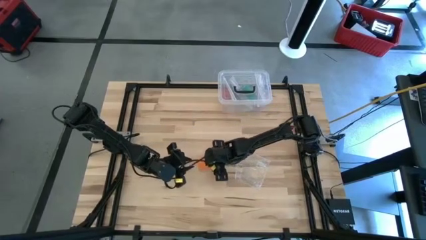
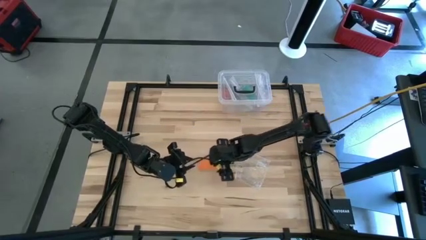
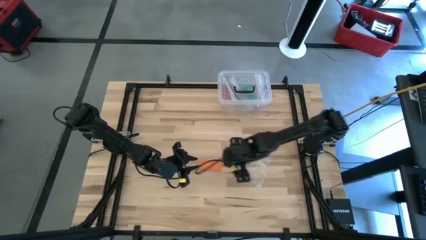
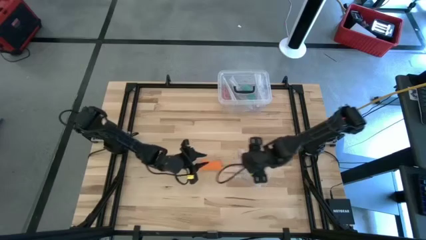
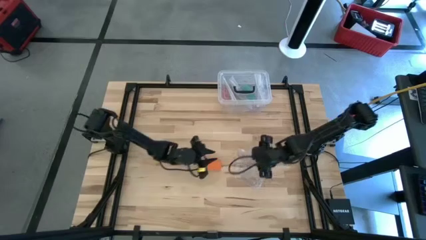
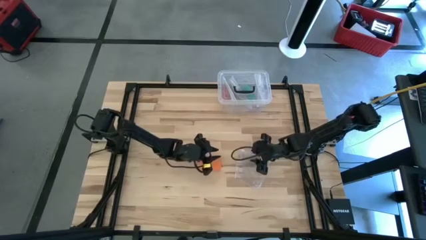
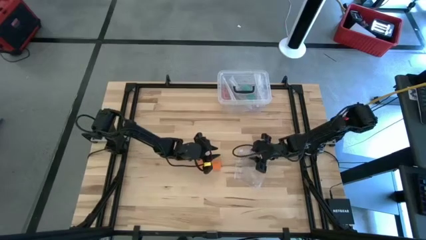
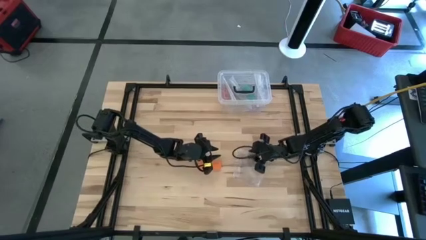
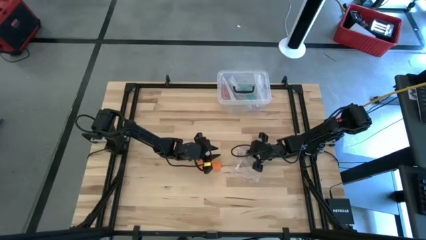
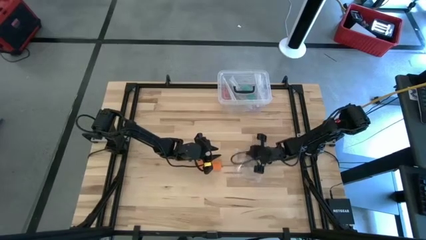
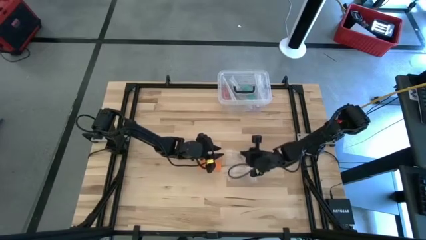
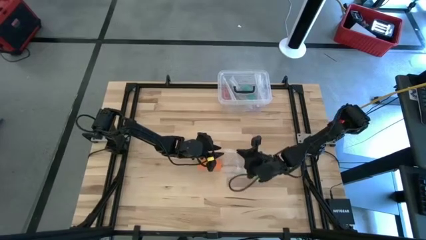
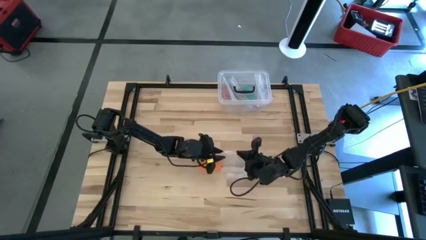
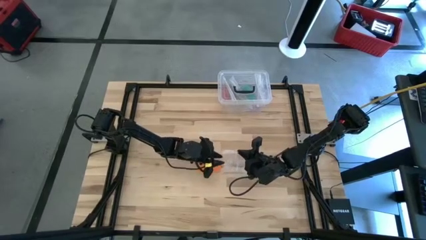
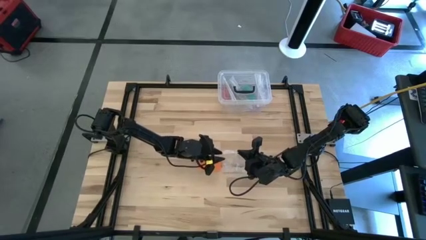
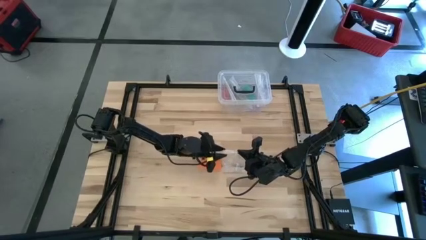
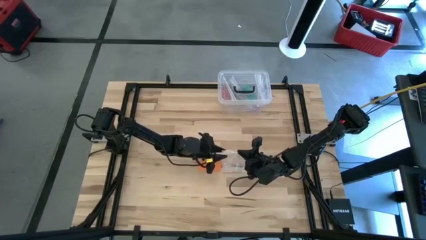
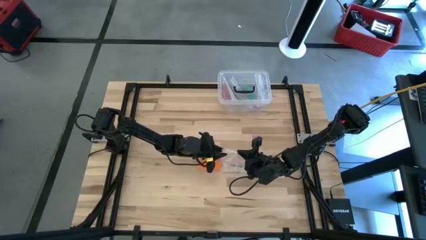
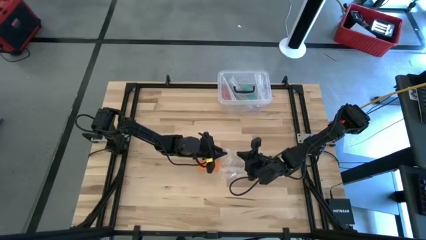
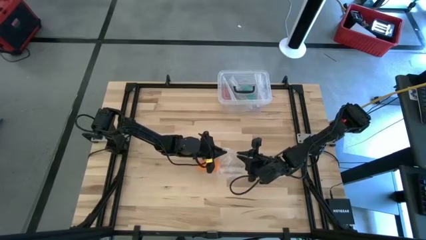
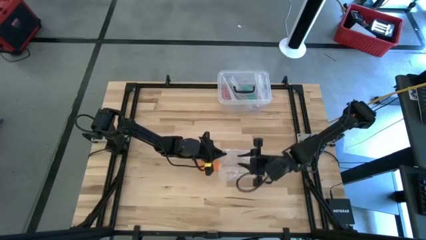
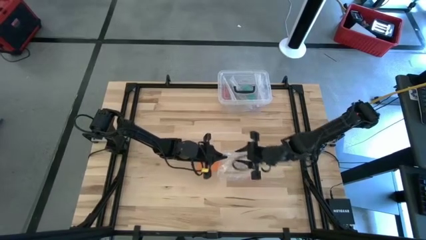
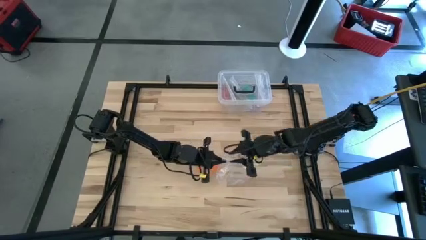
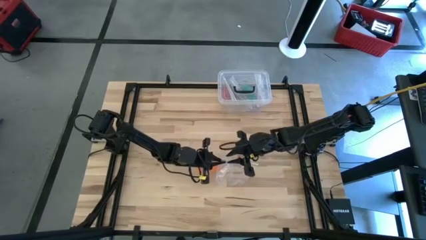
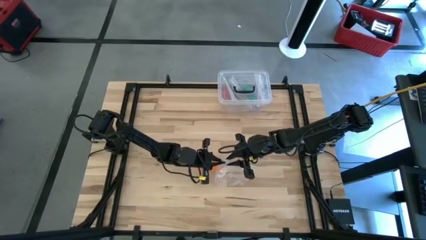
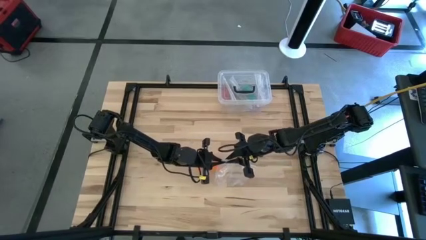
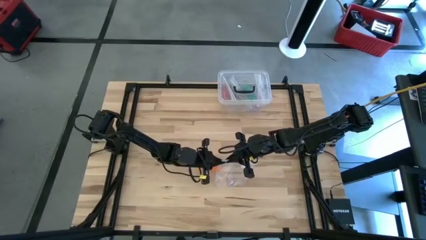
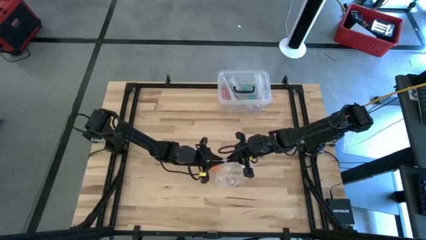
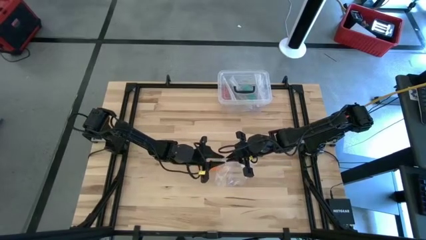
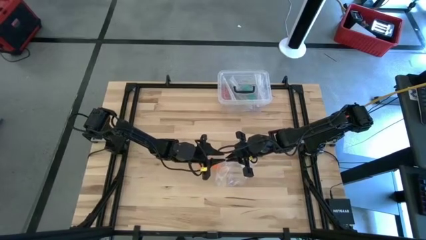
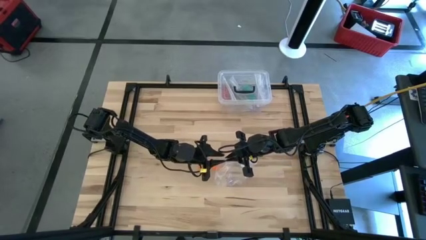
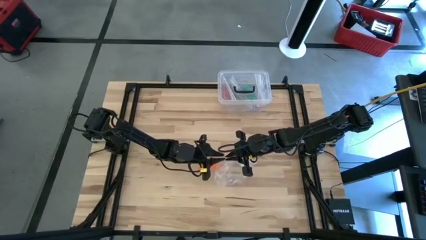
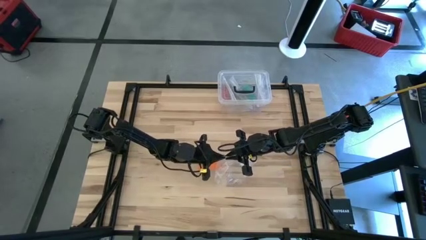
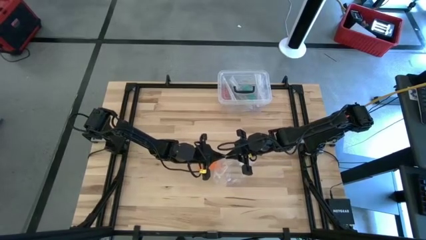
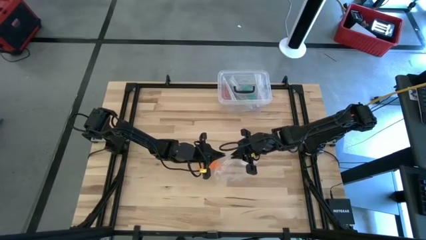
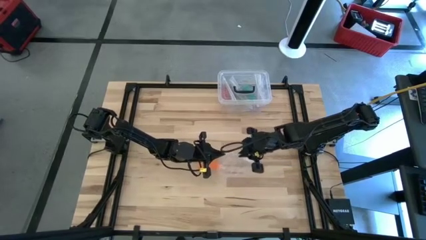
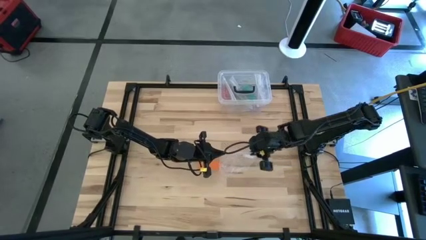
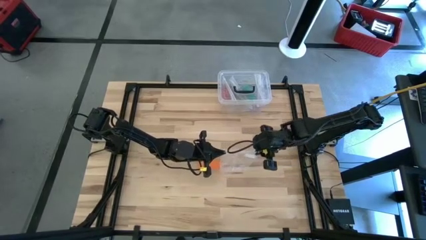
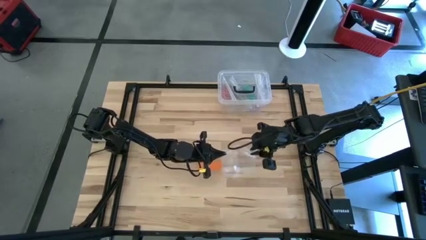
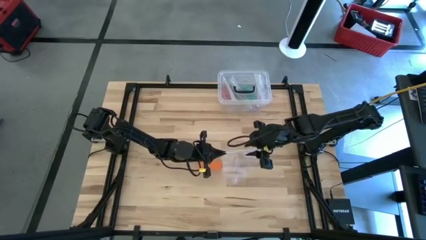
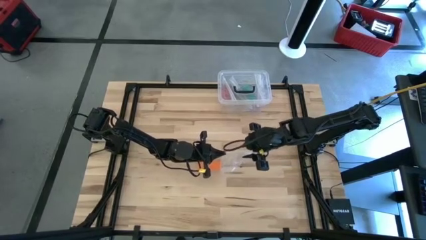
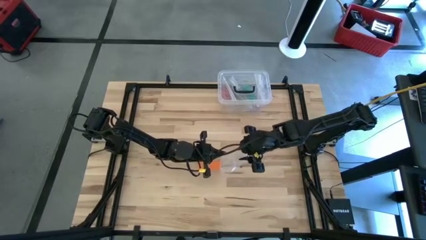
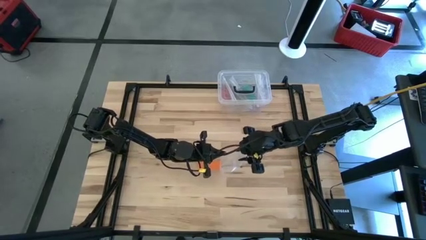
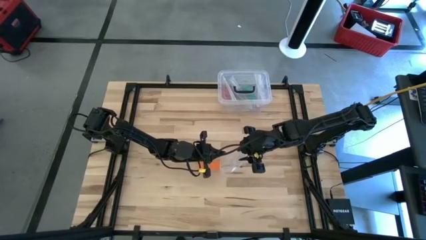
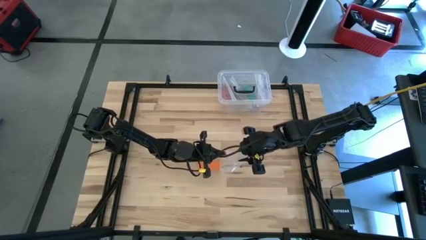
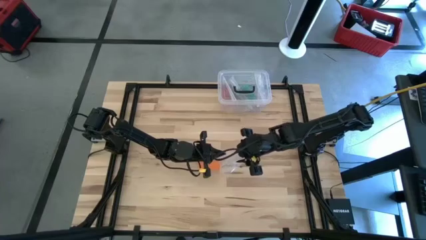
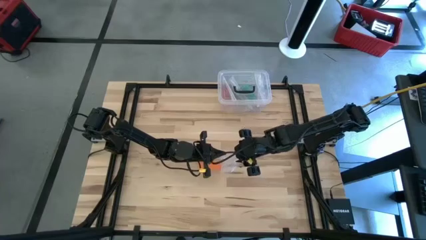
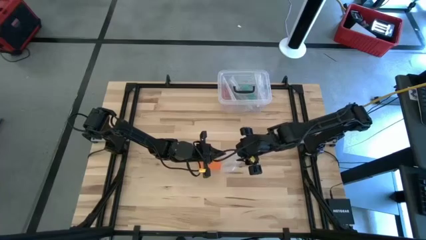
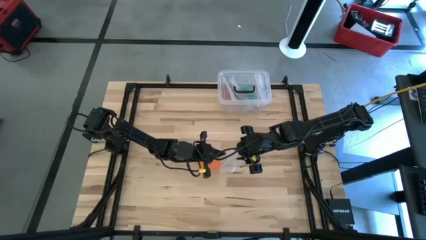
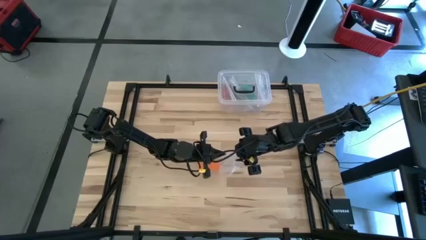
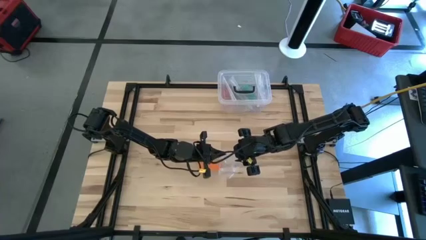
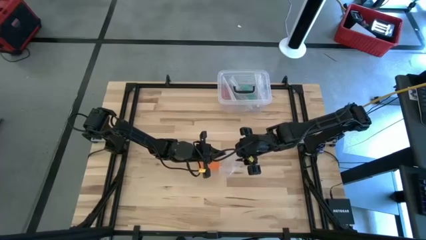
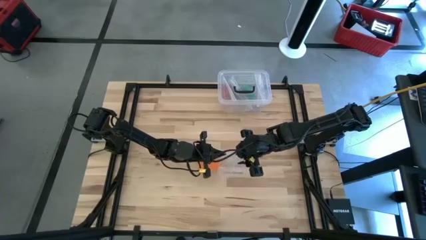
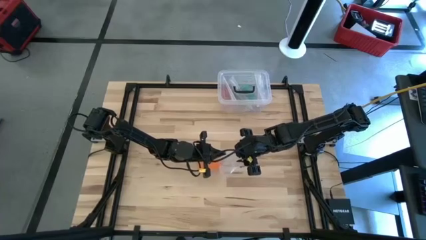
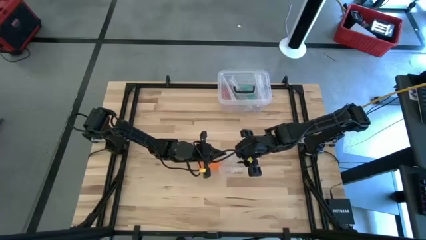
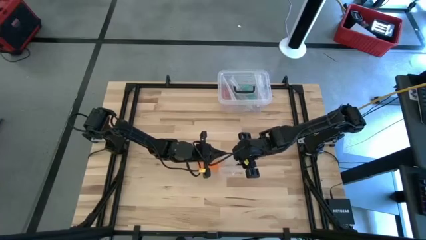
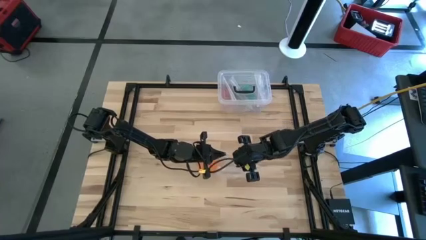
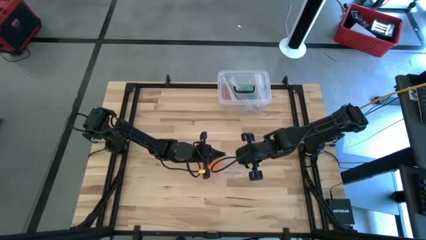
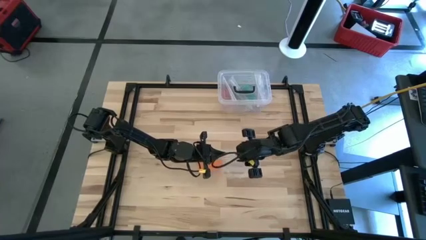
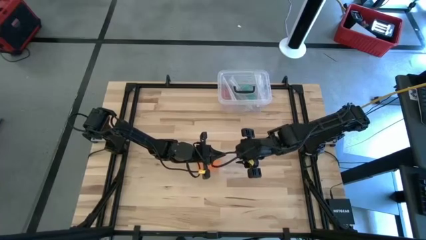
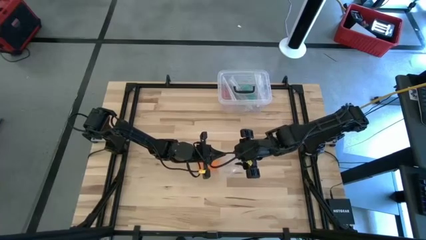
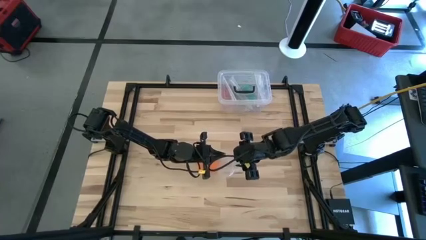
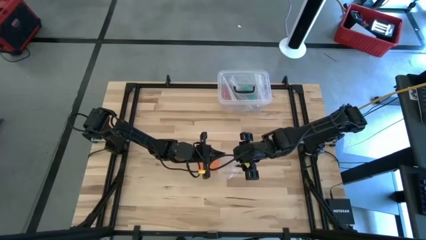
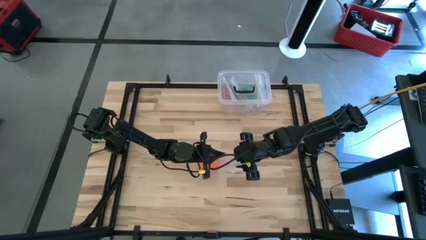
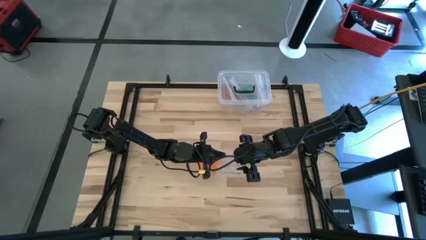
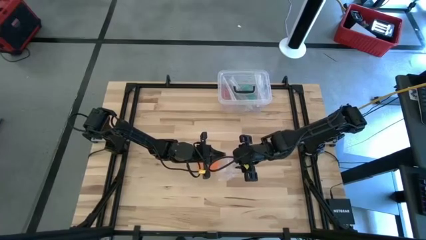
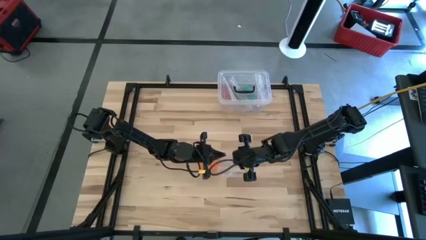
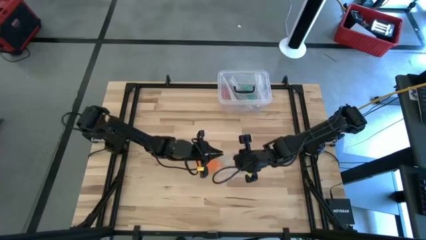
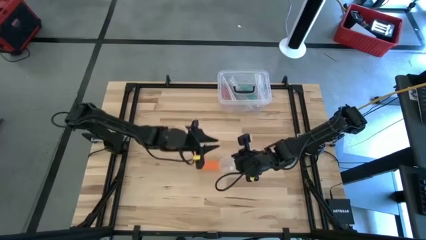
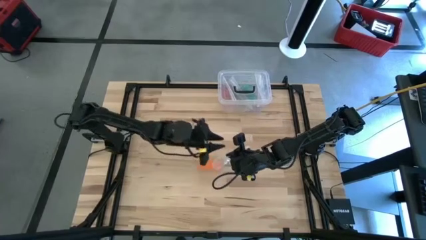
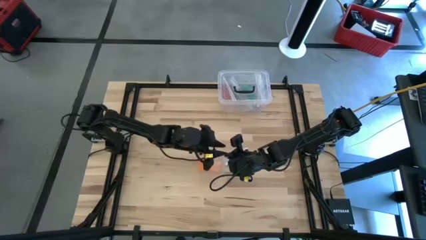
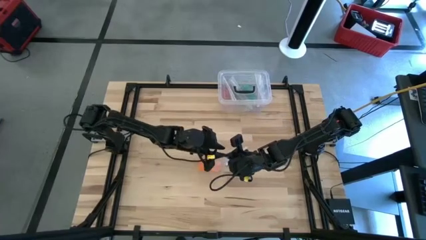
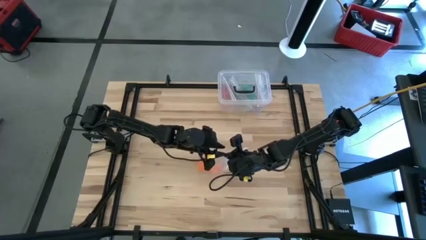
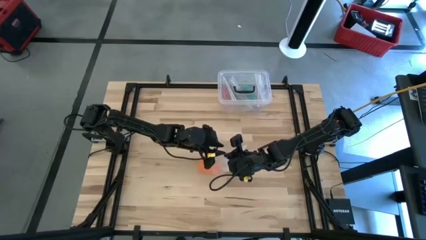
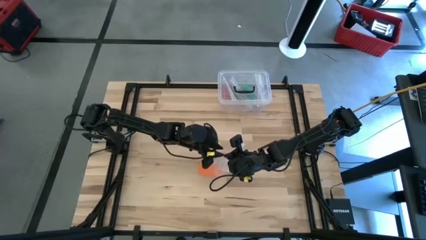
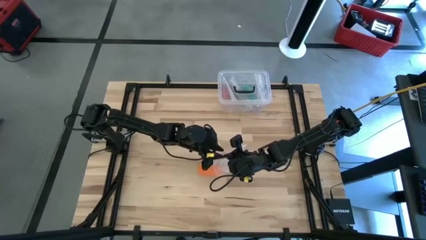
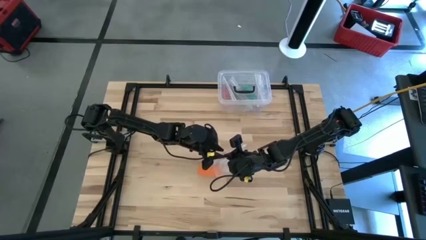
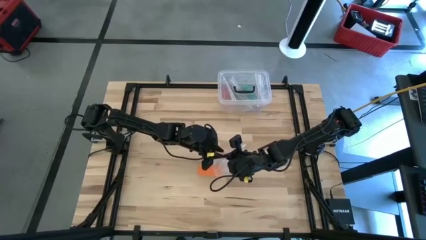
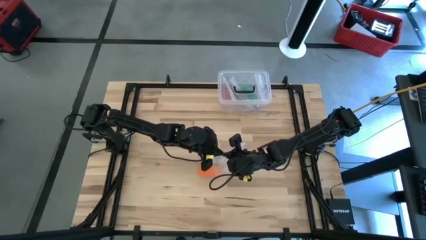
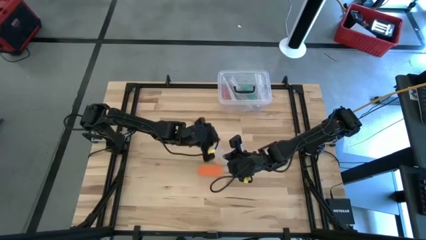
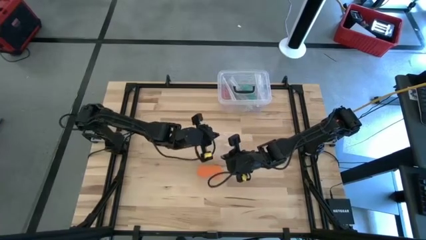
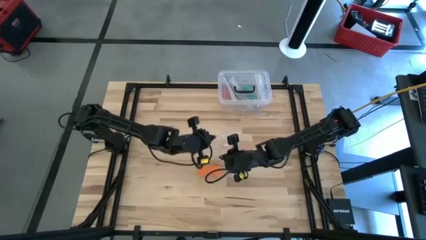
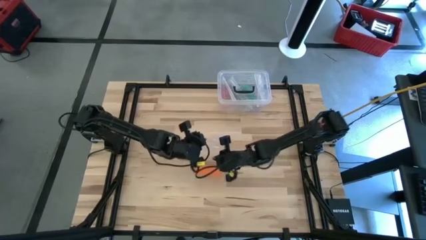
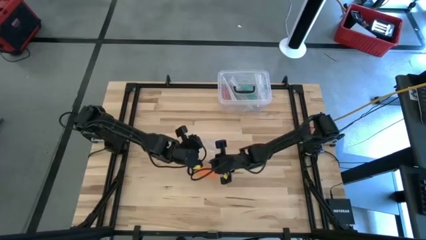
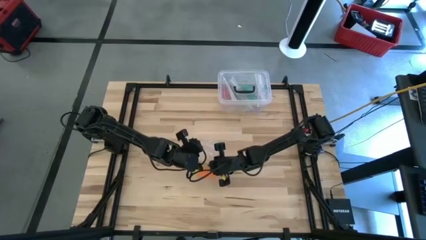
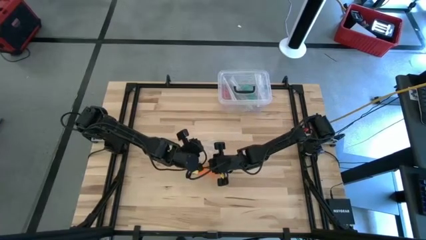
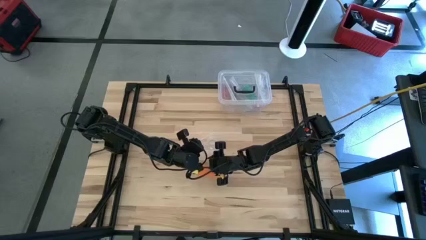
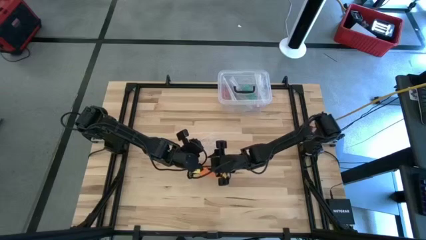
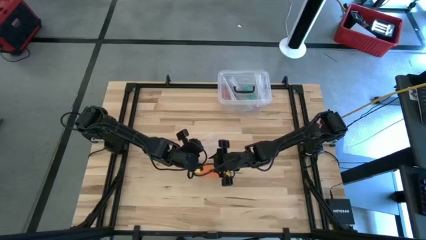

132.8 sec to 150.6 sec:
Task: Roll bandage
Open the zip bag
